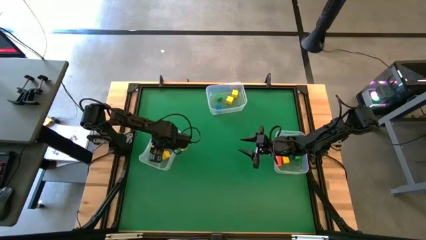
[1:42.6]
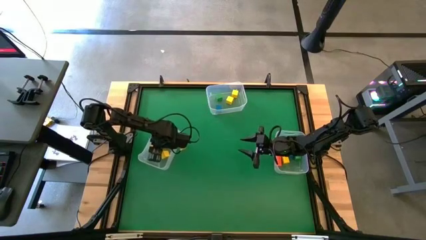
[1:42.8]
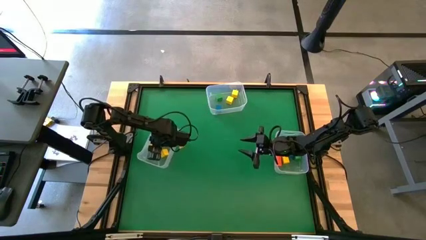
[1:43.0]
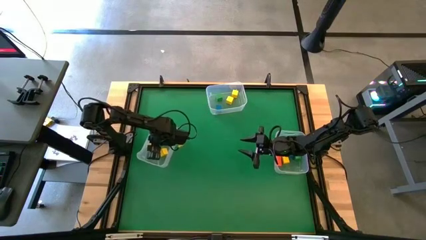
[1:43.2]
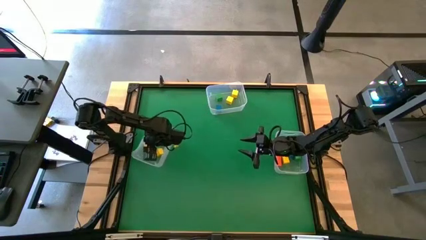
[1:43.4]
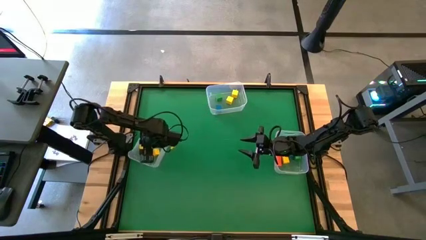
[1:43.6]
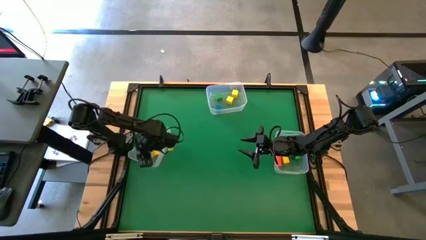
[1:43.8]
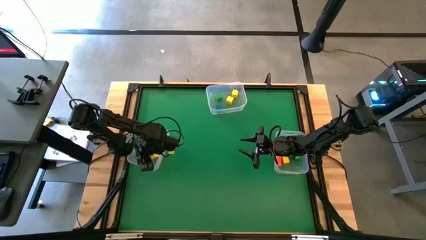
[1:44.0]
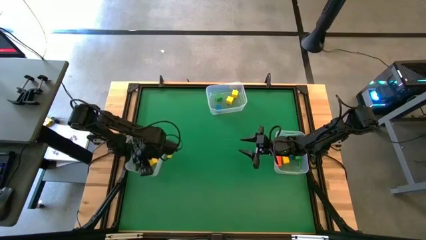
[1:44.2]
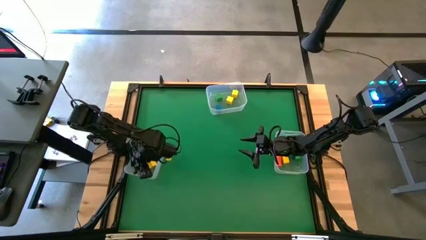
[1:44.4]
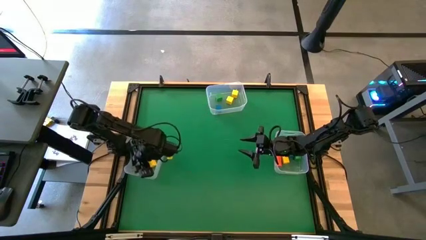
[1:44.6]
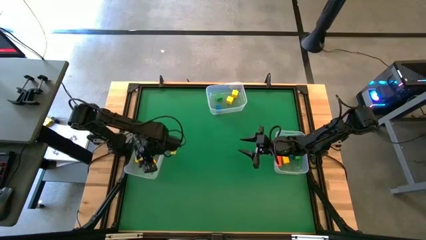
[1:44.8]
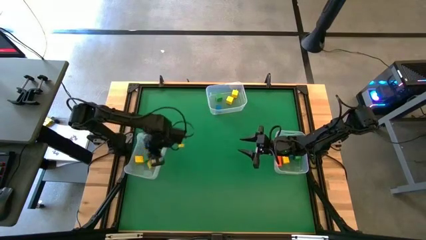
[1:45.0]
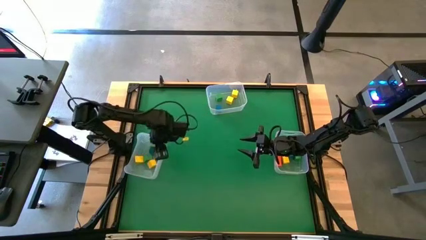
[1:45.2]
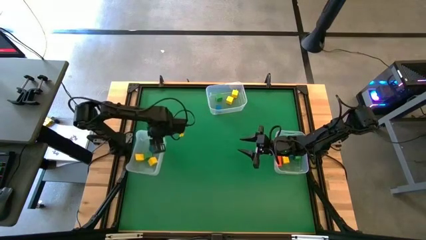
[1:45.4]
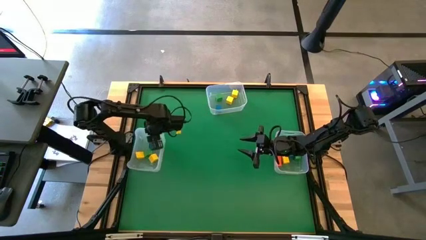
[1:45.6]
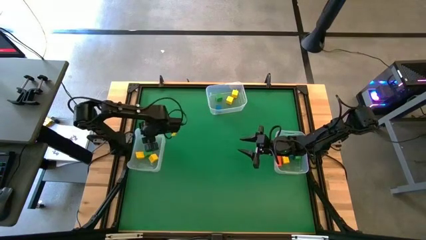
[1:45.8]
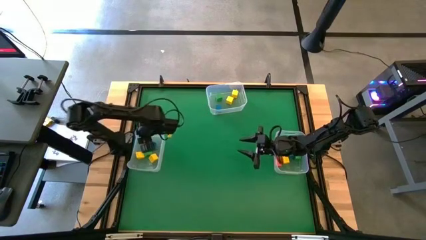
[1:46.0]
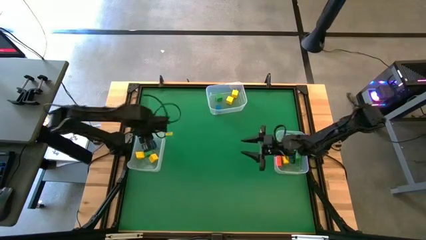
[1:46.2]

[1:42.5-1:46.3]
Task: Sort blocks by size
Adjust the bottom left transparent bin

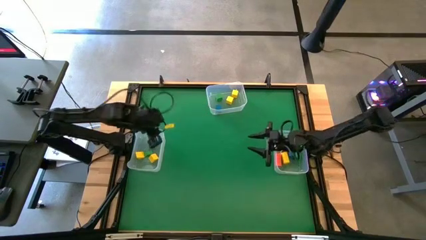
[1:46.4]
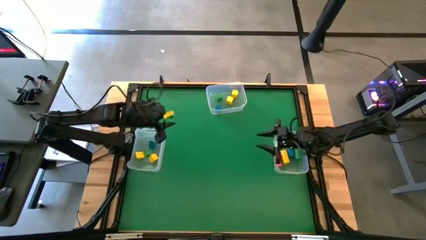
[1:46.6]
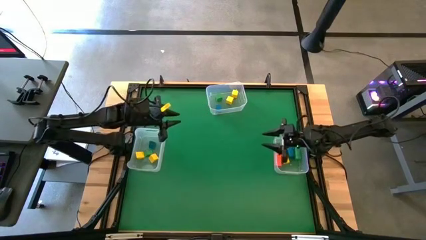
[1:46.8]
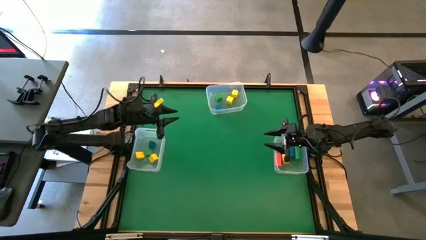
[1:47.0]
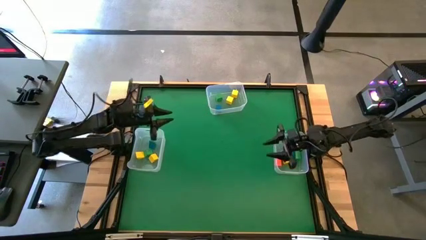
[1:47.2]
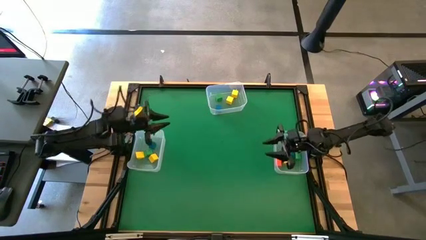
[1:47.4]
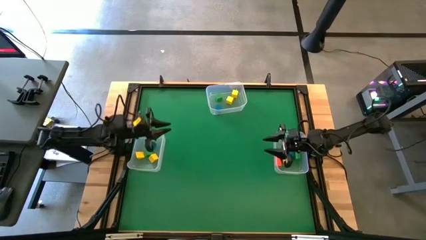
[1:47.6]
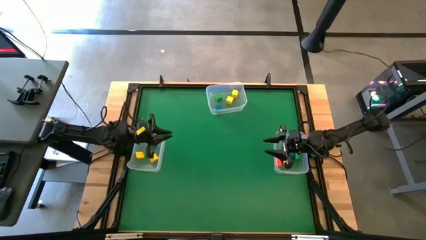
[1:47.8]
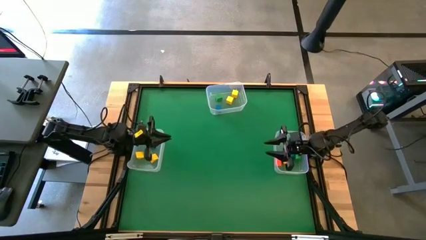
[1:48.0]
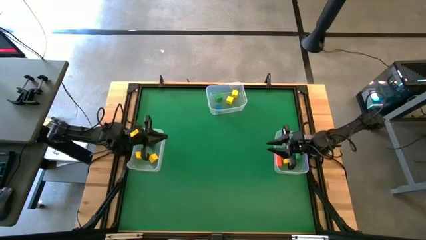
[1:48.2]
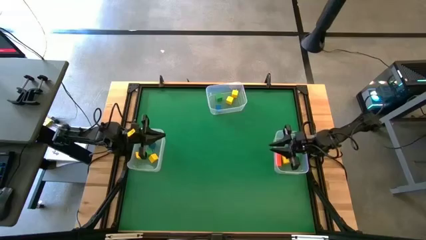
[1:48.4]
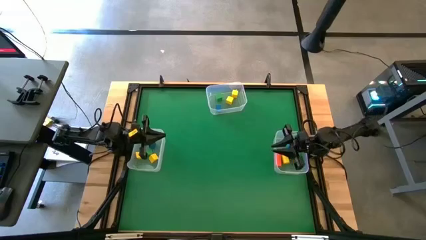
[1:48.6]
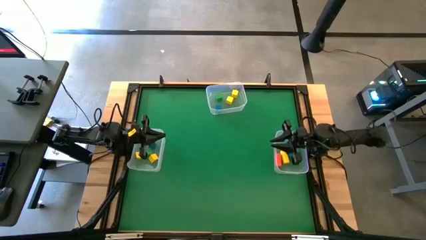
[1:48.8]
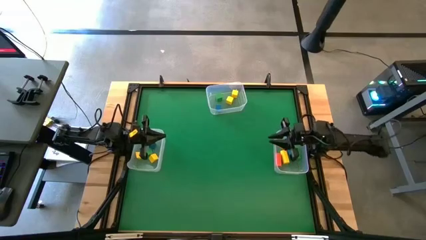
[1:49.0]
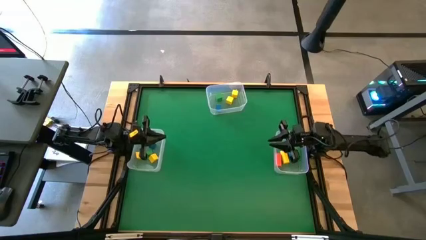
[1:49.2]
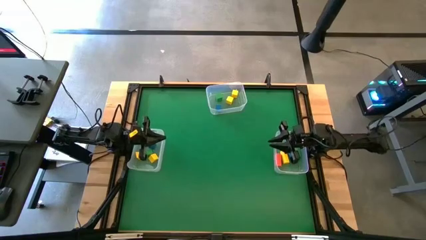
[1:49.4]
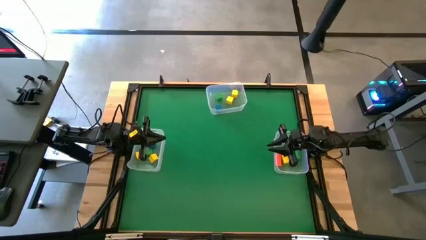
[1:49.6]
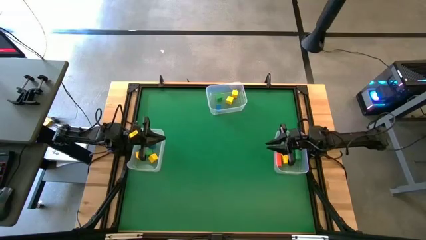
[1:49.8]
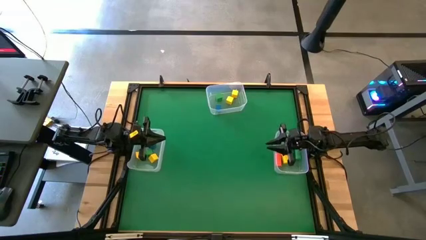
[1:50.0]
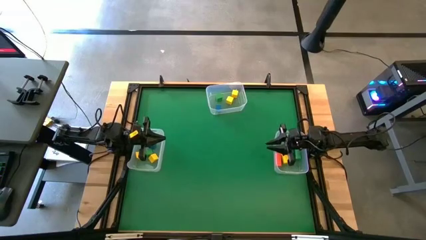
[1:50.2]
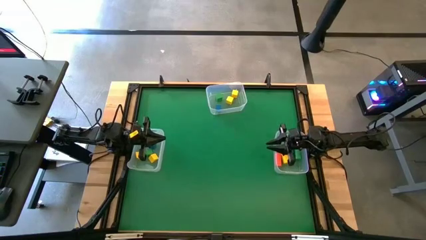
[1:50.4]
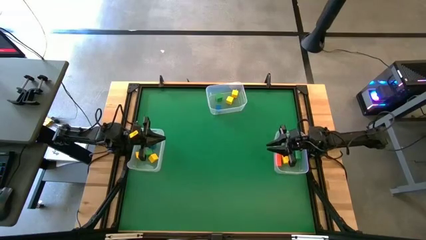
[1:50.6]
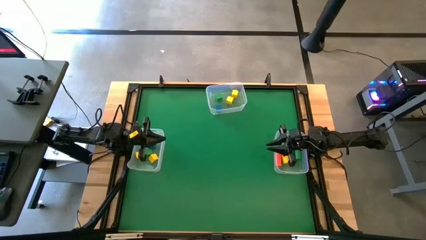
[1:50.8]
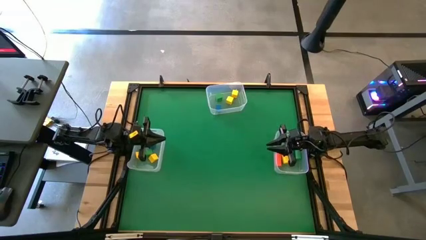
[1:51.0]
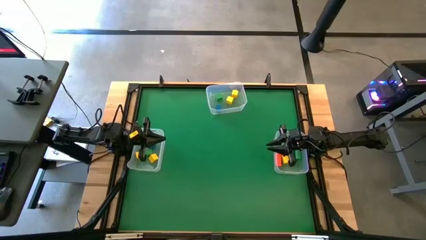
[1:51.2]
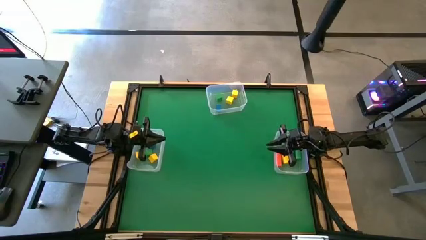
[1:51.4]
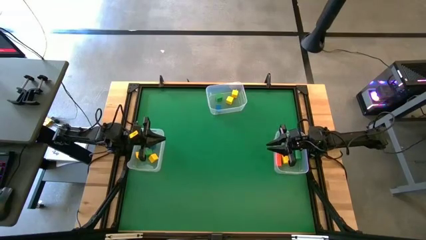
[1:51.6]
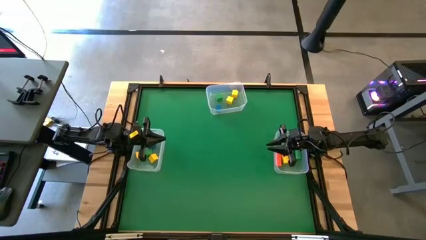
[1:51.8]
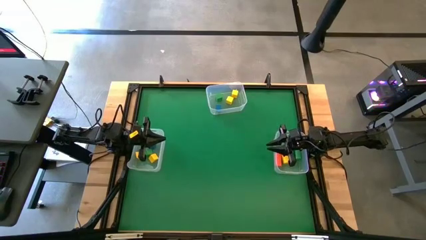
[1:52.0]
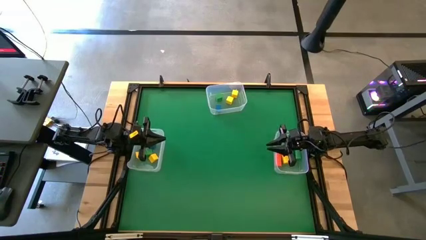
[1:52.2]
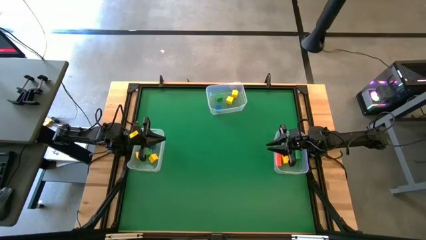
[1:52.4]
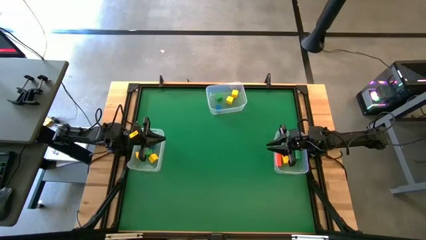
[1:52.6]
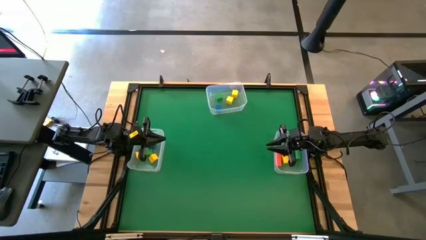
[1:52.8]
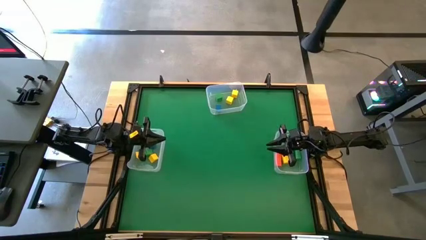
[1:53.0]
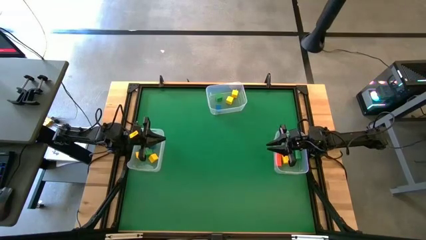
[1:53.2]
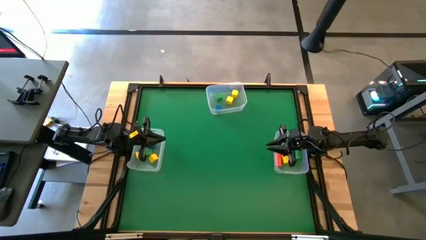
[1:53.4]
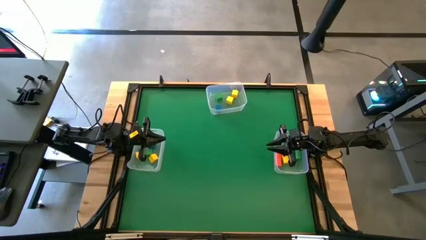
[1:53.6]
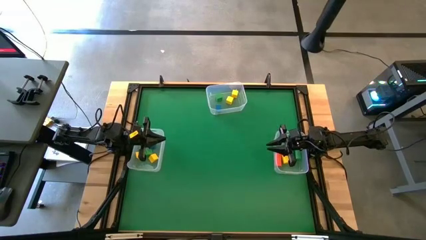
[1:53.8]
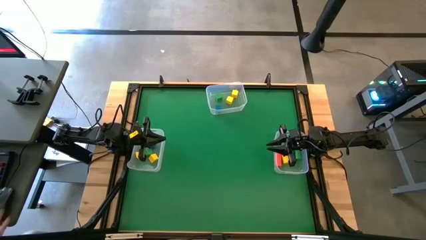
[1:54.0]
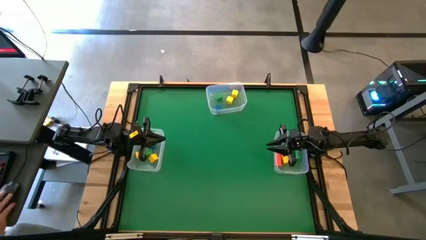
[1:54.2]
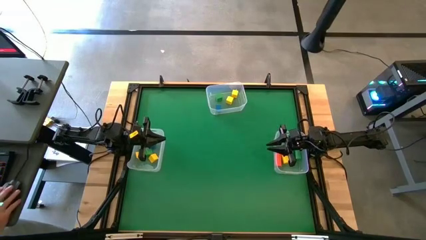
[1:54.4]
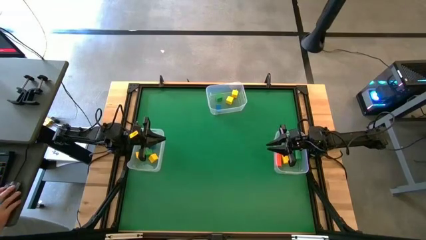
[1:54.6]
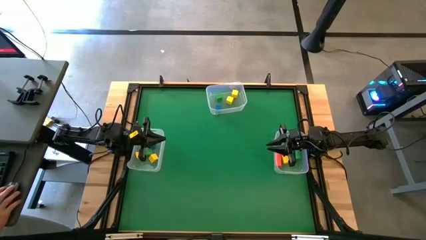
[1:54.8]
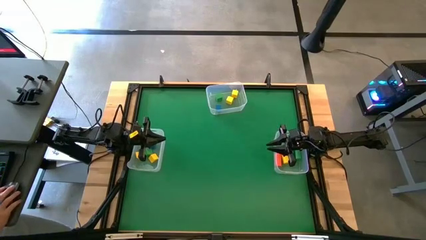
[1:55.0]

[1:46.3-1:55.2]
Return to Home Position

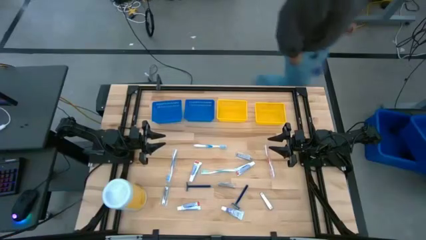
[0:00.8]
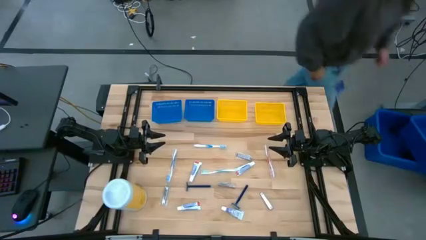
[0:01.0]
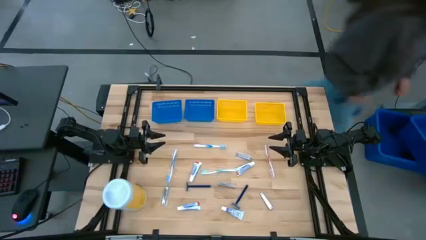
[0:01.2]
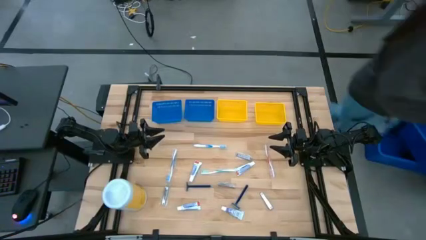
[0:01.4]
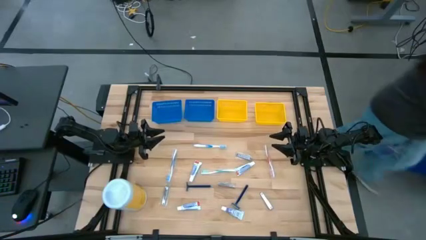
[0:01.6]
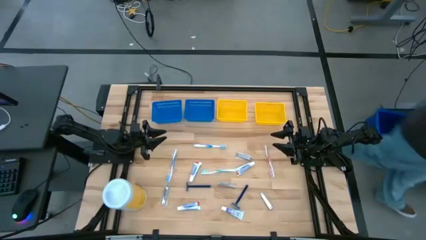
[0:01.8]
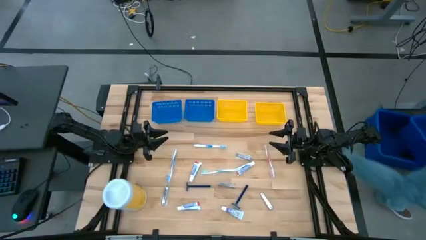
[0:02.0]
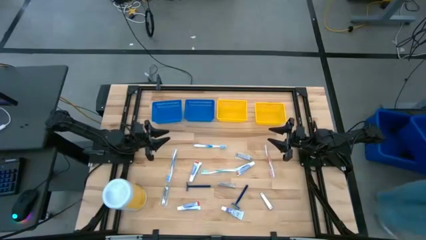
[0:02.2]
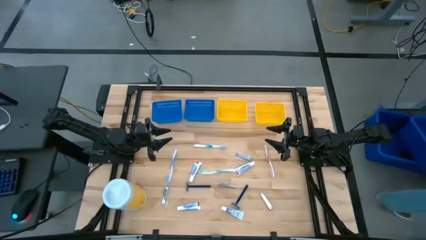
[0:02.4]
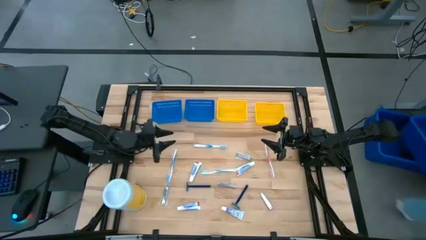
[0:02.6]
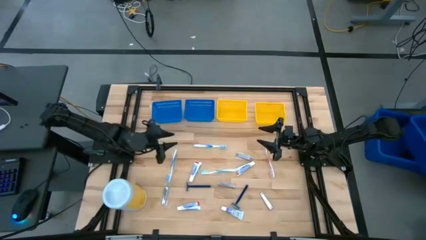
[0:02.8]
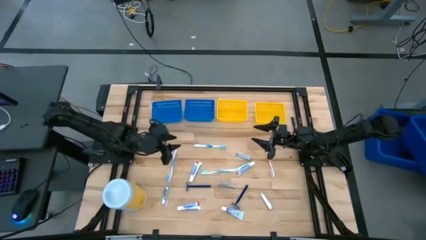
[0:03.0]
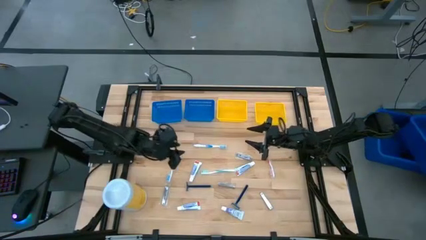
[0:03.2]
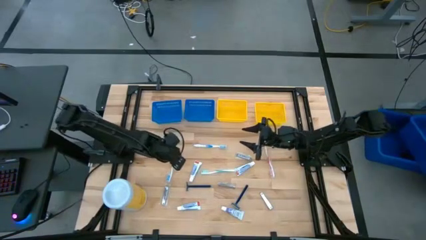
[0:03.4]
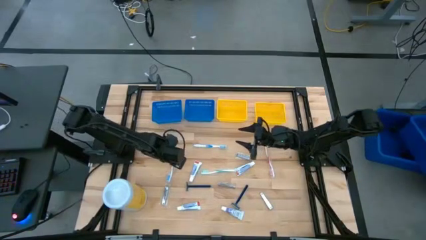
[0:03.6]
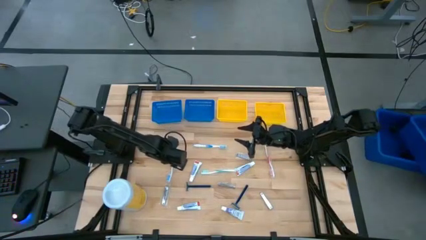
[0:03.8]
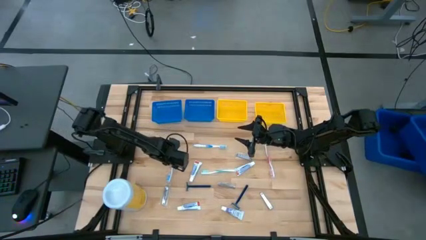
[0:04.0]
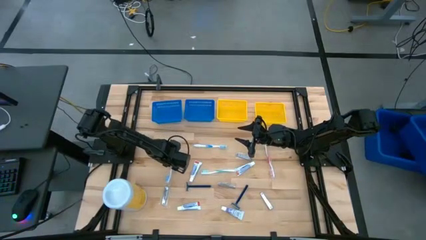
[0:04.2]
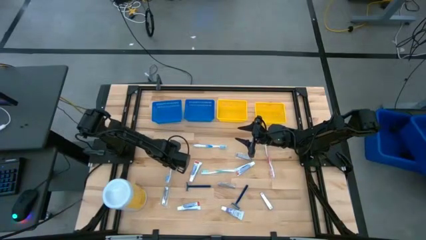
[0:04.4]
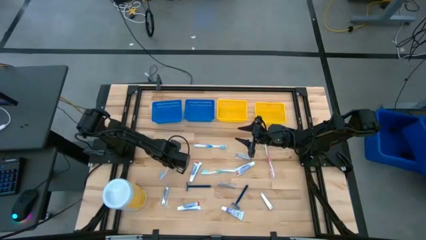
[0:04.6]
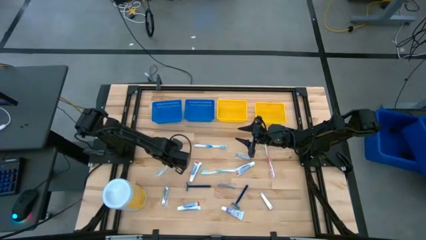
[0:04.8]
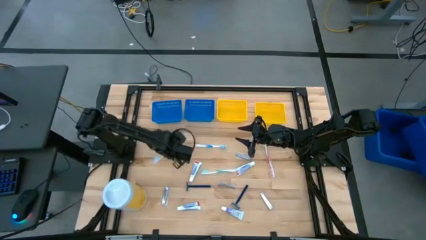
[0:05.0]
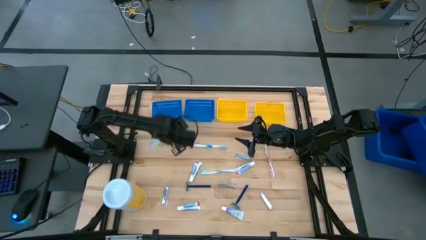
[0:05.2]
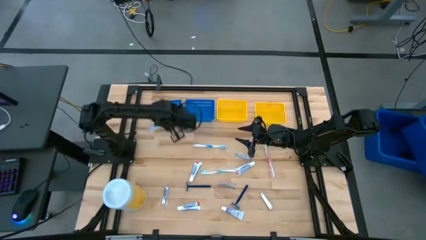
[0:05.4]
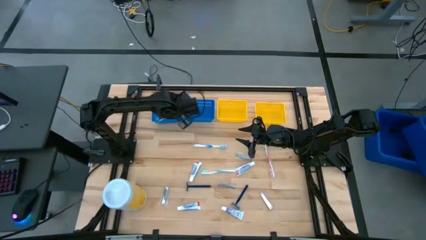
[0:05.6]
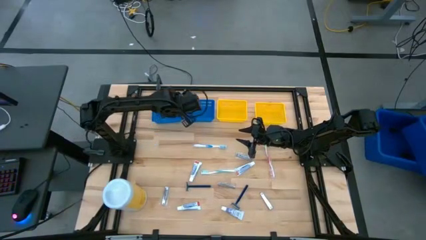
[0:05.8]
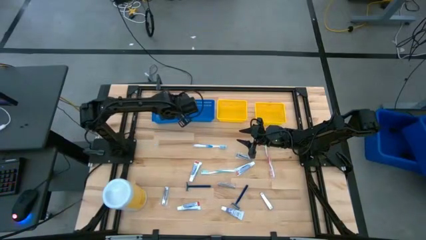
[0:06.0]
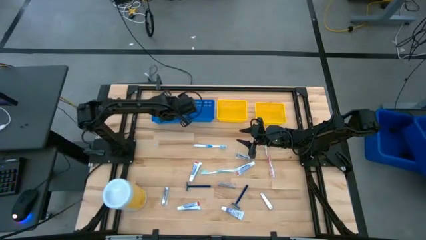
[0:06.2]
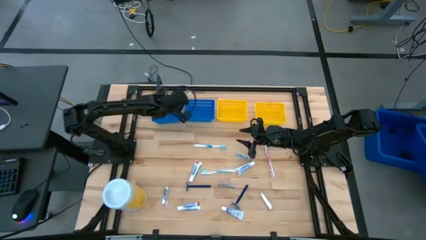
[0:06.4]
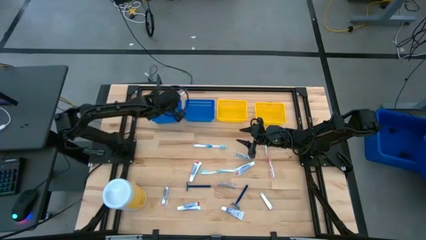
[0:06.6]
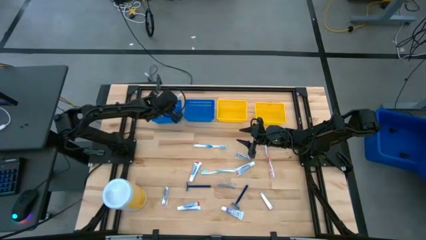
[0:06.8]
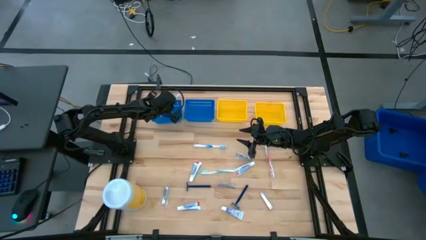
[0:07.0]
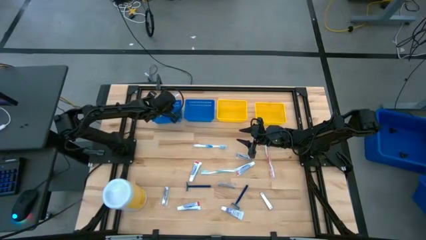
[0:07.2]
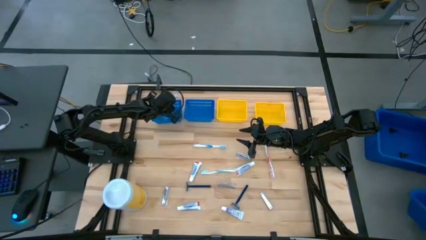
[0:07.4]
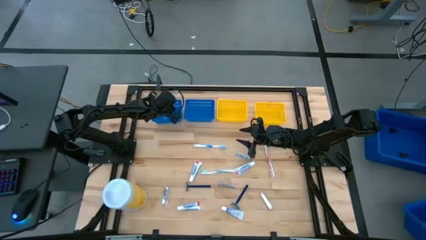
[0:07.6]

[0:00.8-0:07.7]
Task: Pick & Place Travel size toiletries
Put the blue toothbrush into the left blue bin
